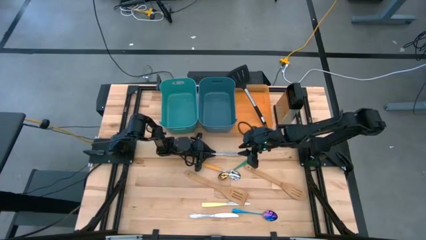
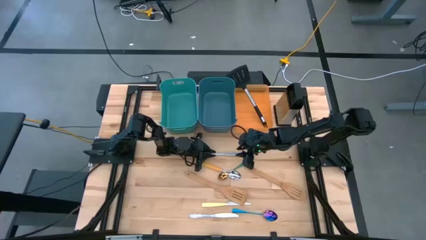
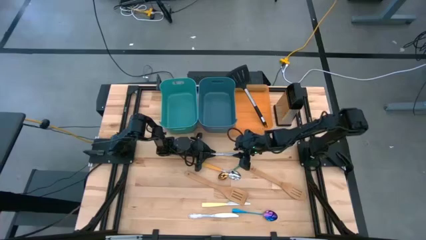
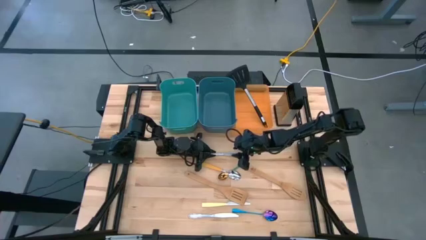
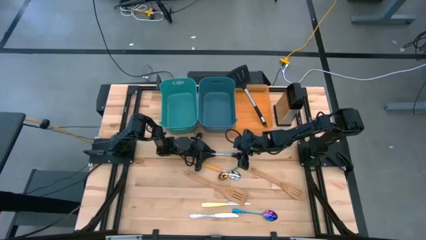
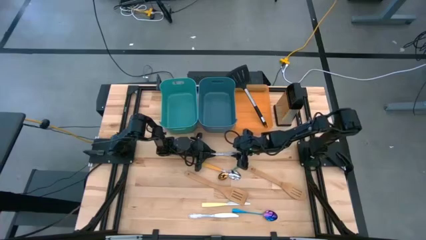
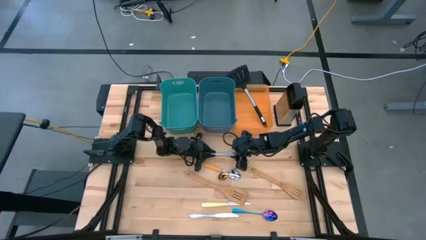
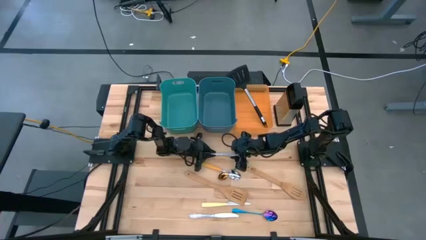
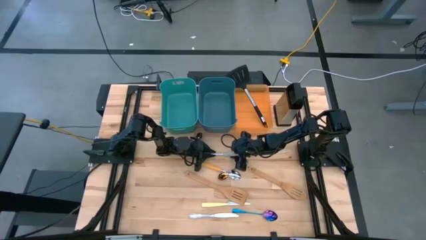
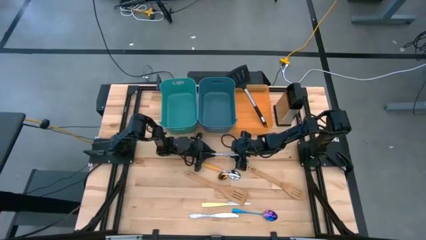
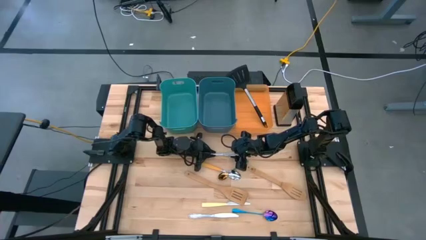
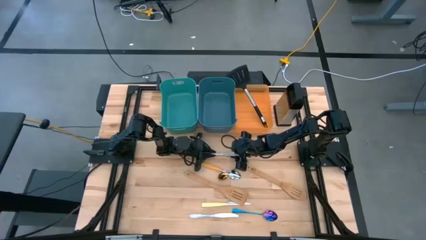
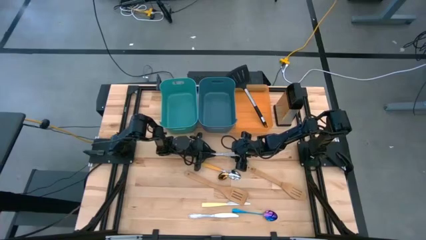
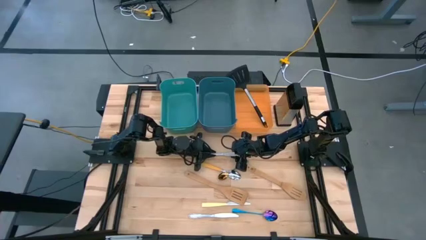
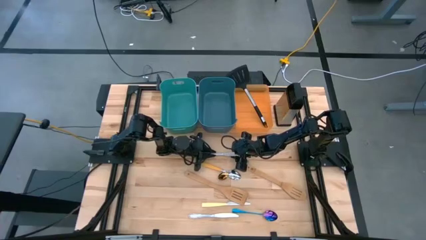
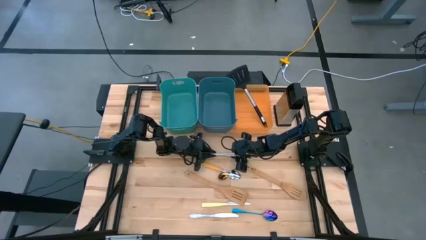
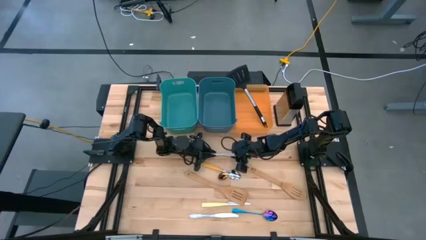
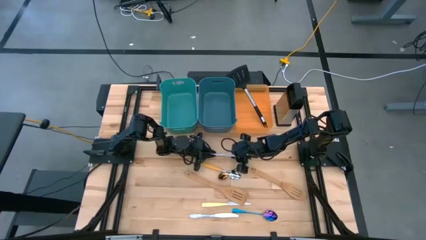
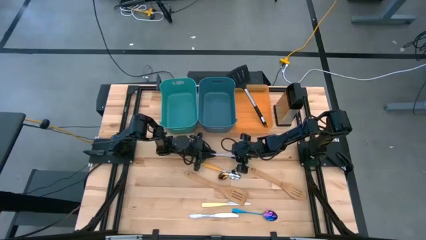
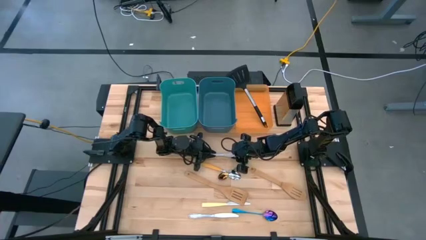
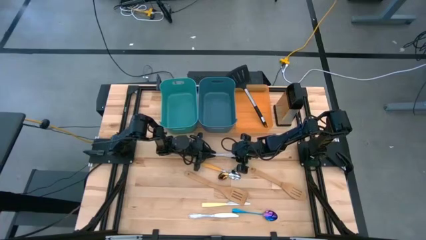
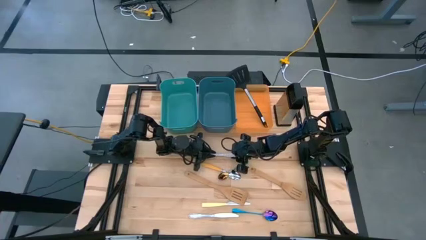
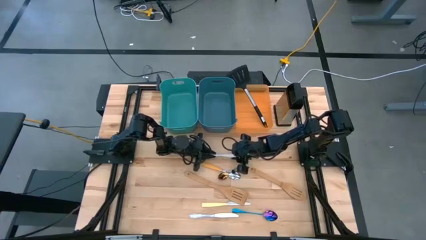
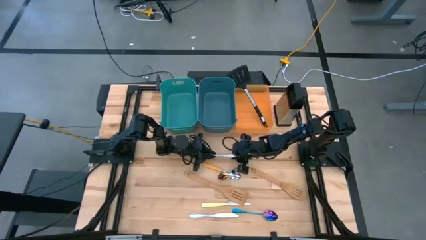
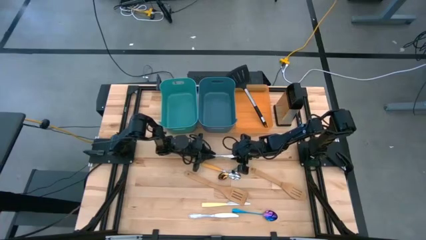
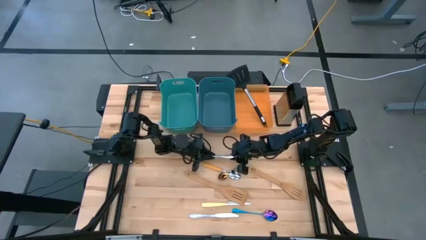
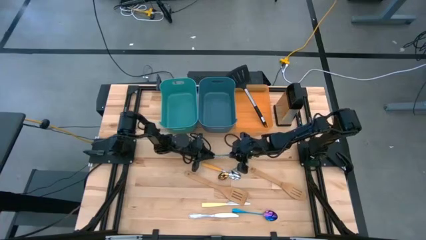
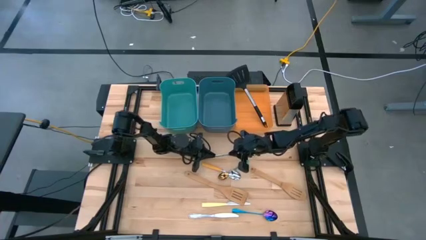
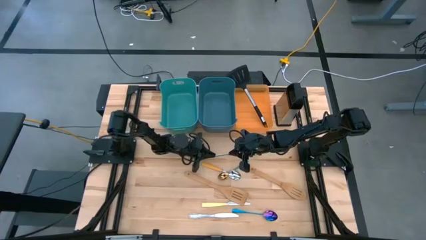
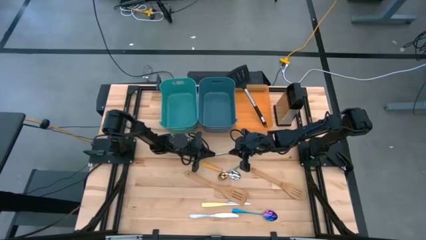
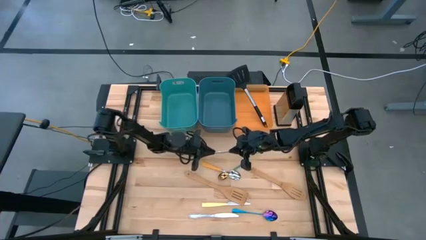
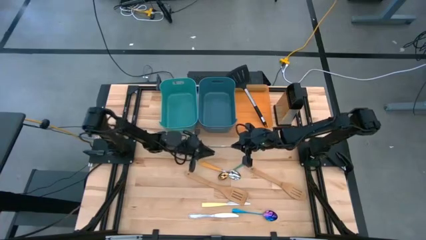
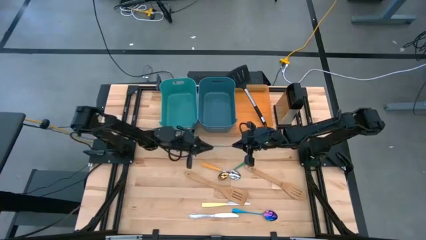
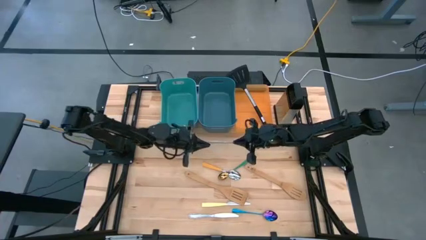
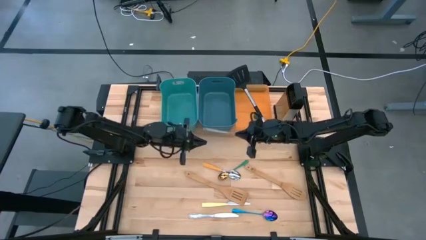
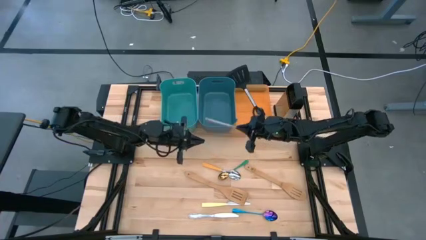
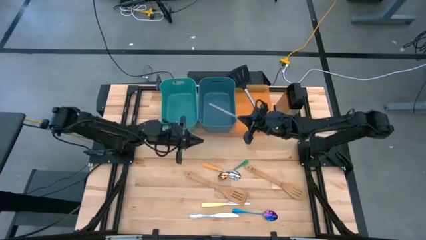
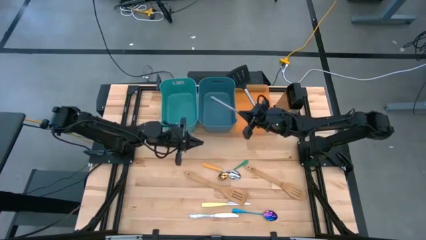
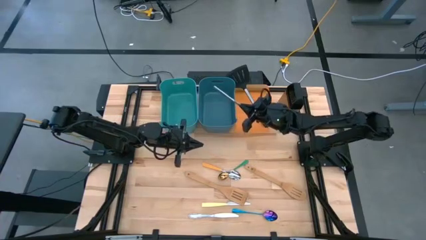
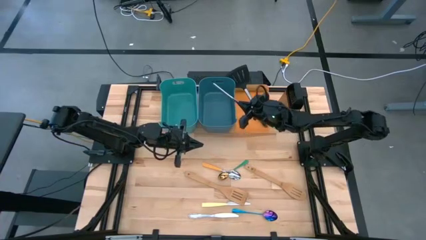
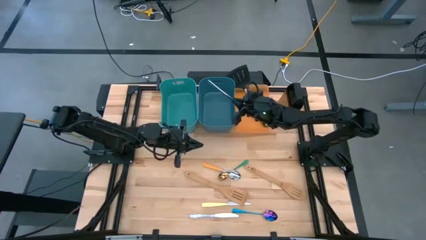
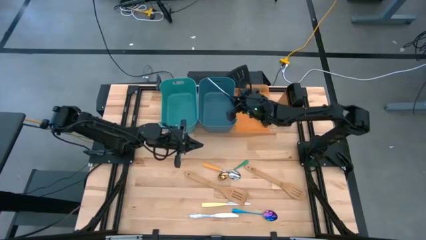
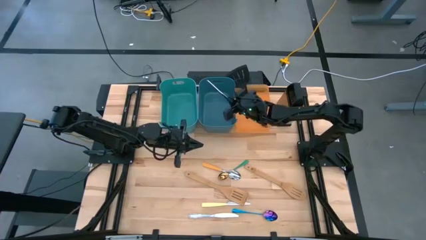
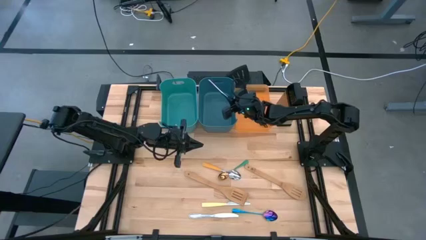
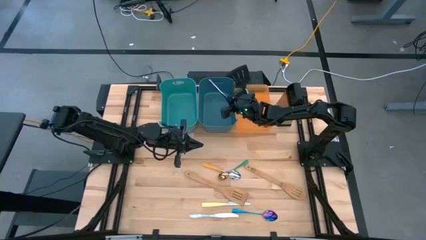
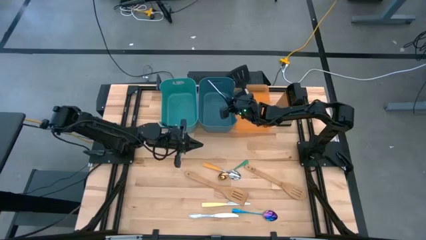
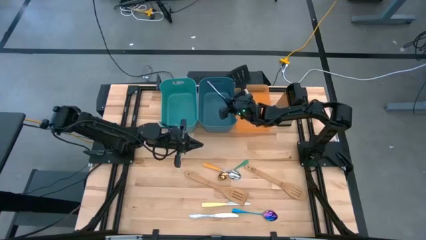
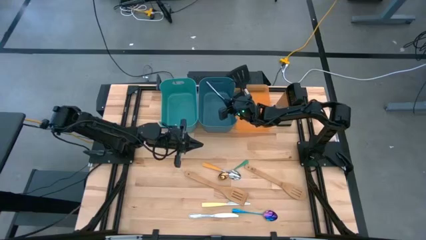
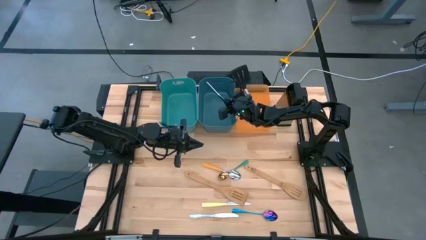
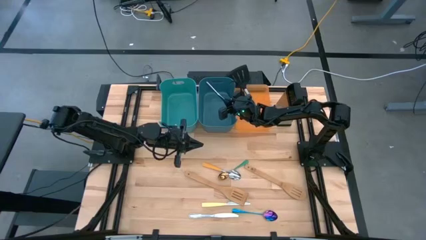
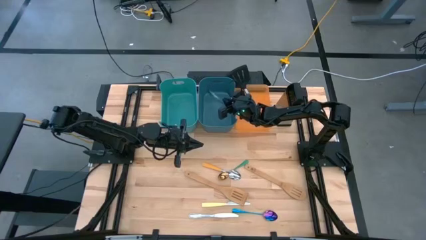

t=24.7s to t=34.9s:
Task: Pick & Place Kitchen Items
Put the top silver table knife into the blue bin

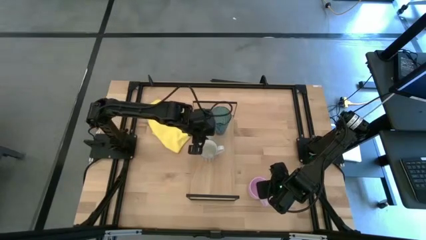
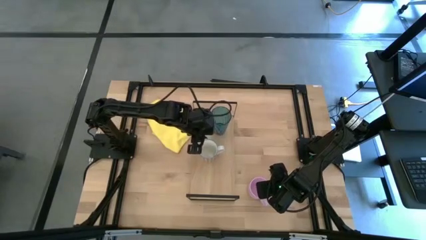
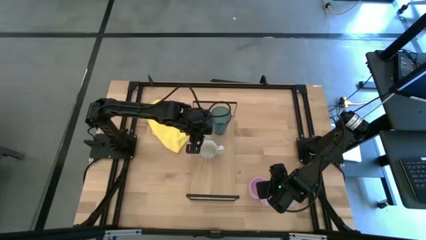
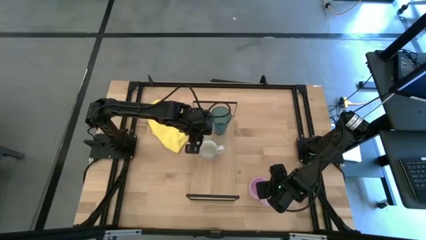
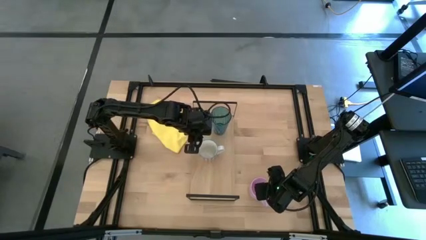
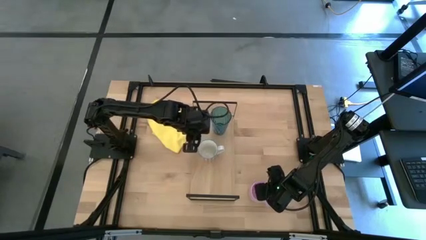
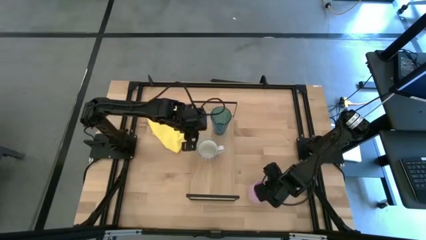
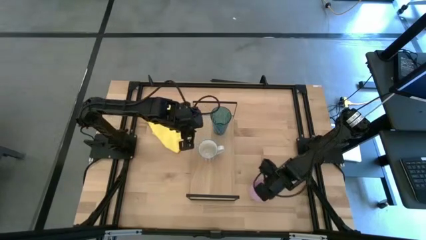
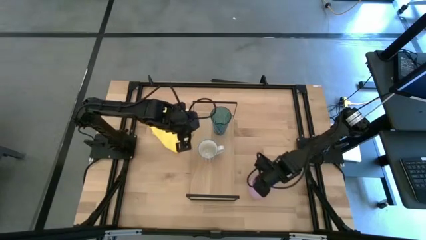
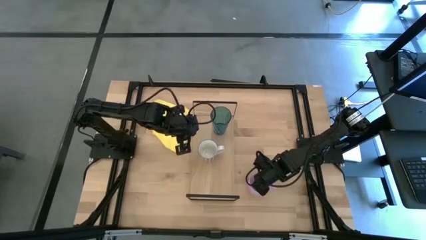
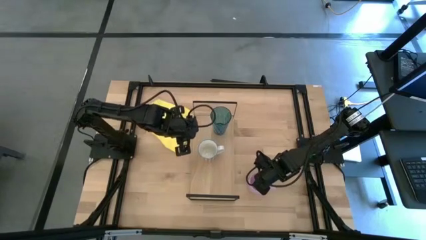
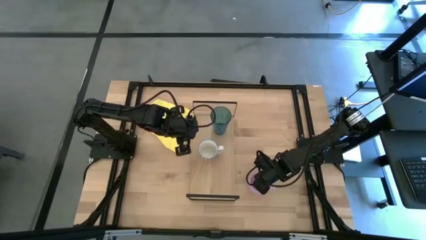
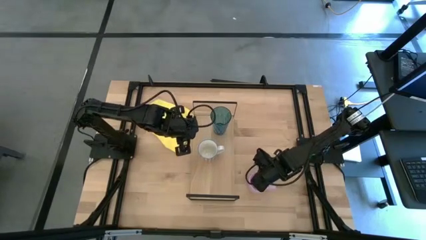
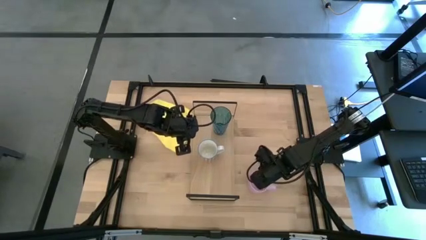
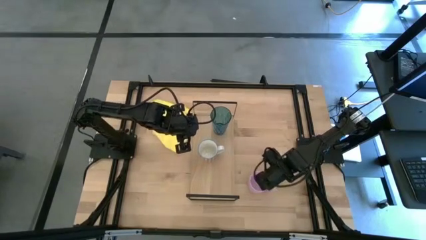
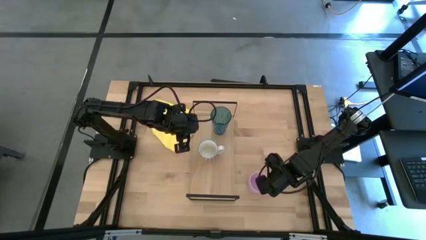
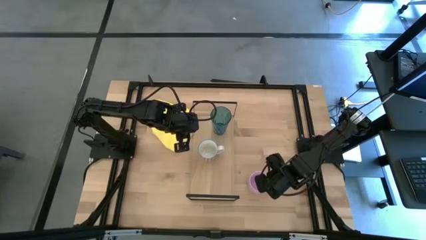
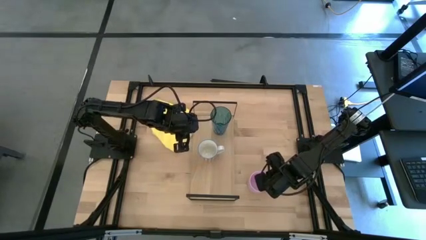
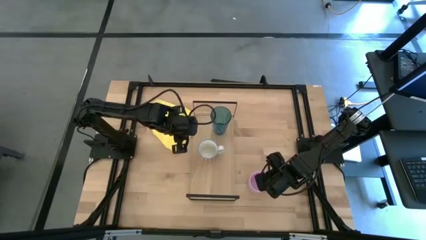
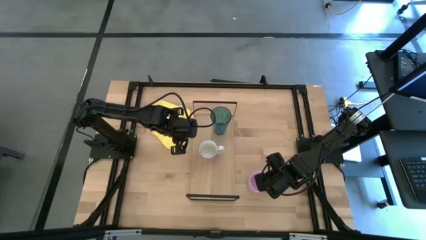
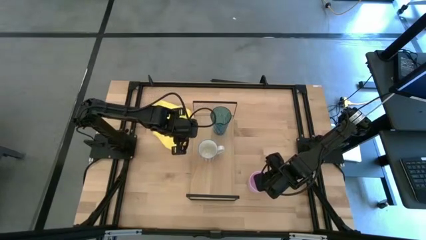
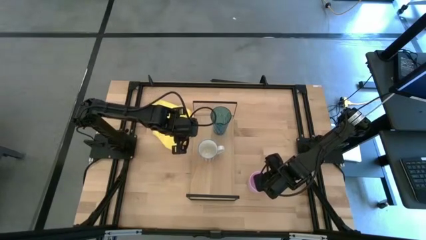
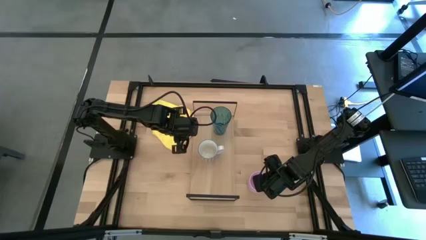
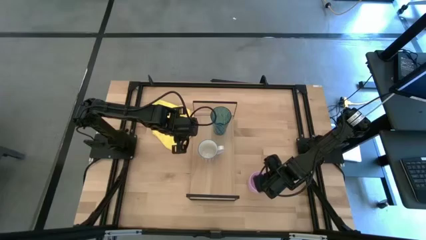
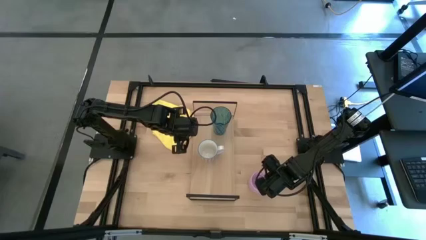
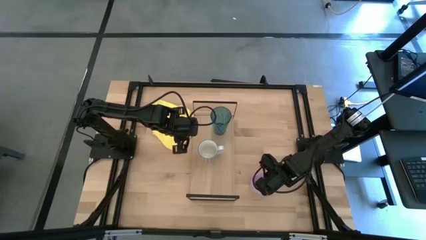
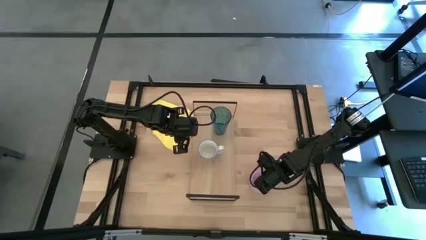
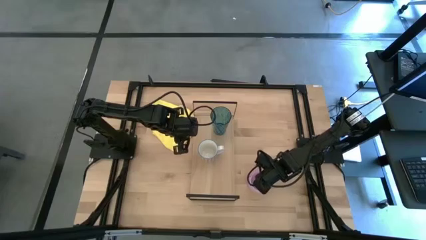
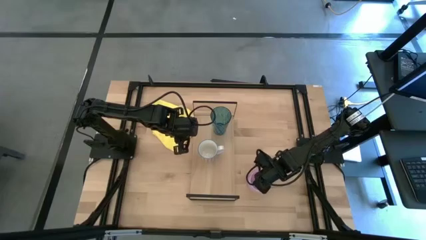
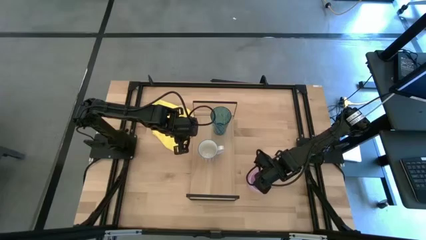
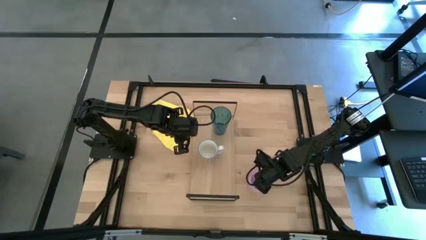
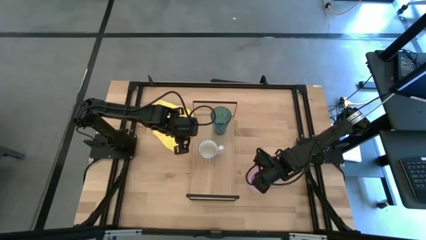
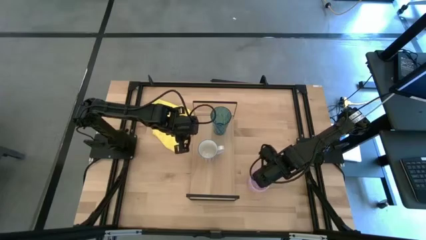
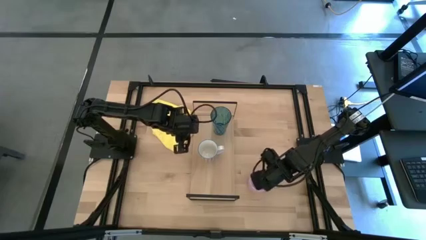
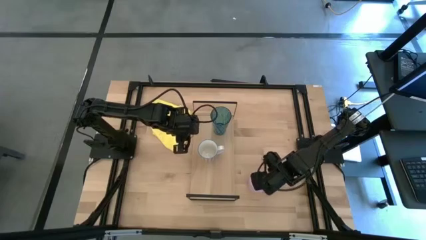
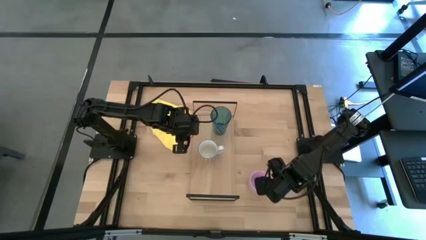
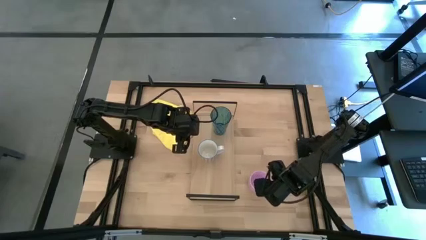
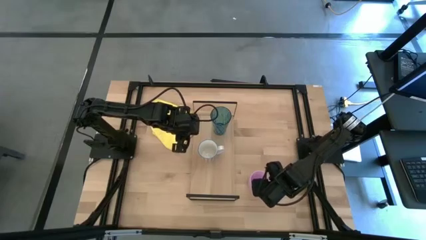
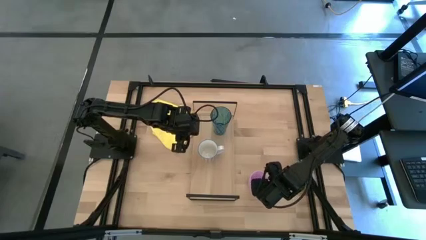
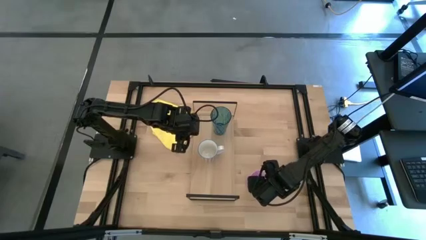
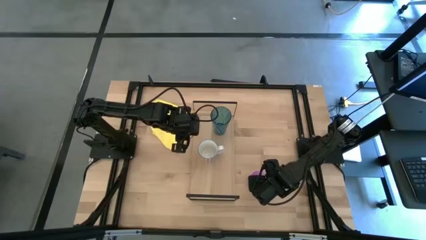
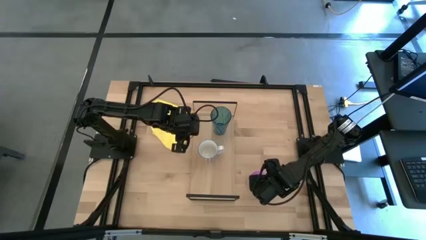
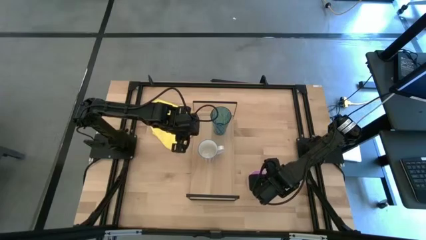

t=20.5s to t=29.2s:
Task: Stack small to large cups/mugs on shelf
Put the pink mug on the shelf
